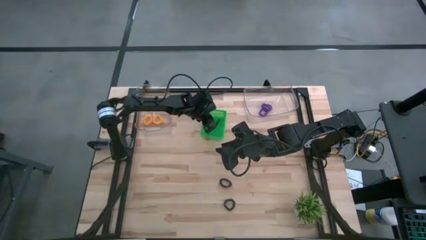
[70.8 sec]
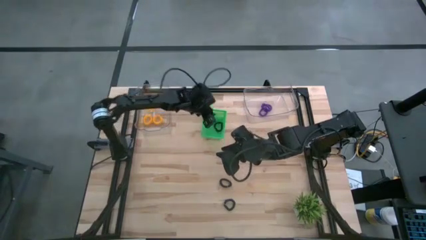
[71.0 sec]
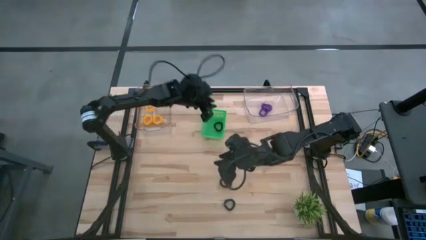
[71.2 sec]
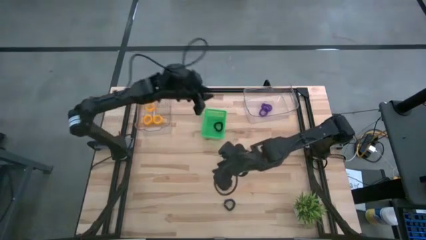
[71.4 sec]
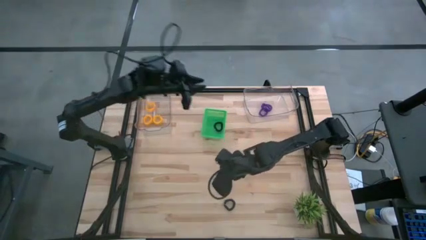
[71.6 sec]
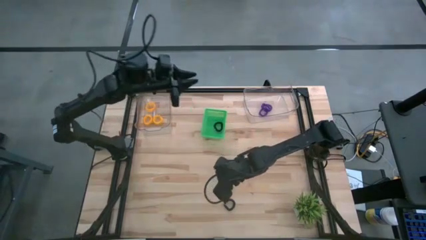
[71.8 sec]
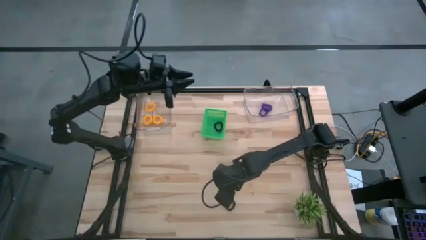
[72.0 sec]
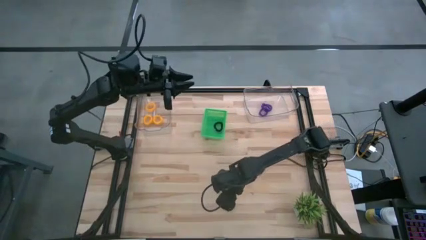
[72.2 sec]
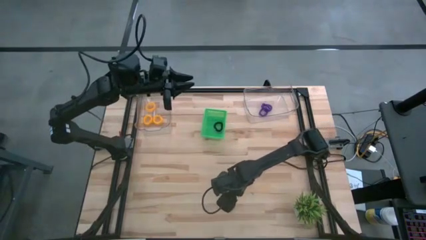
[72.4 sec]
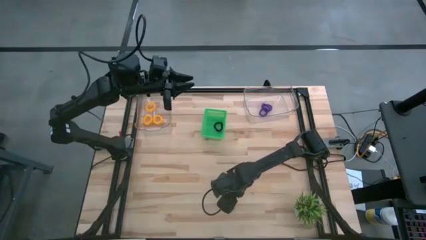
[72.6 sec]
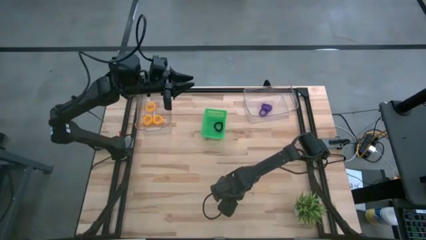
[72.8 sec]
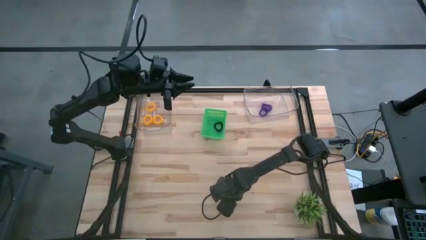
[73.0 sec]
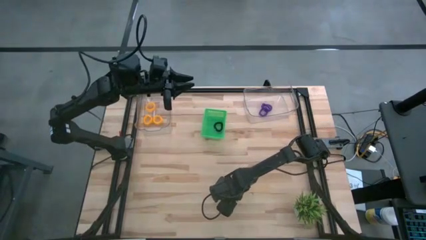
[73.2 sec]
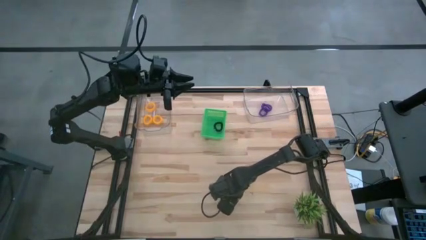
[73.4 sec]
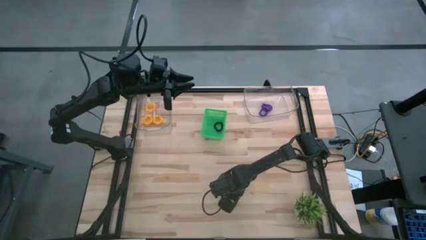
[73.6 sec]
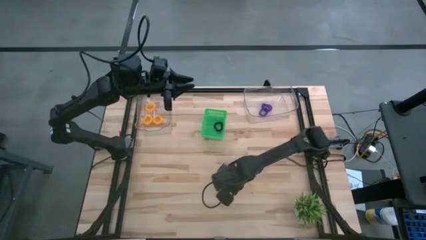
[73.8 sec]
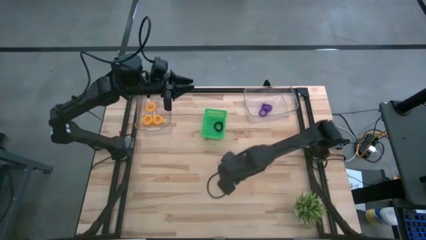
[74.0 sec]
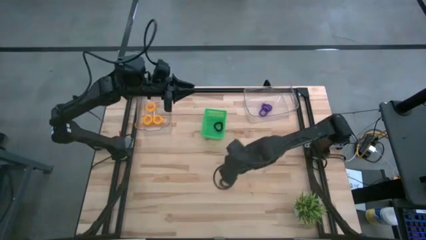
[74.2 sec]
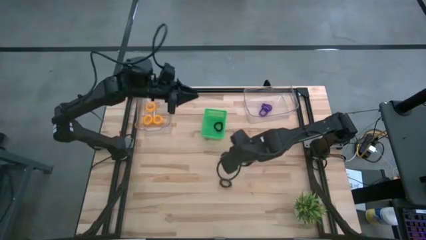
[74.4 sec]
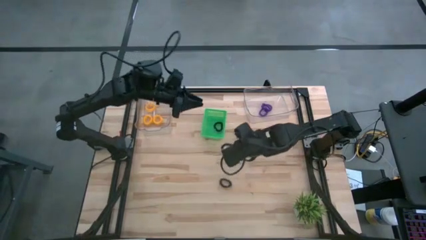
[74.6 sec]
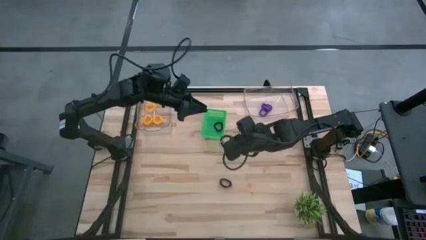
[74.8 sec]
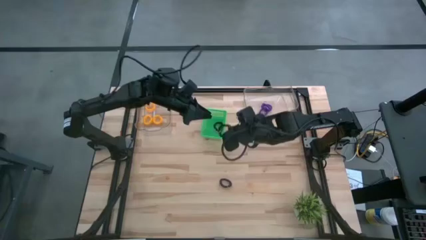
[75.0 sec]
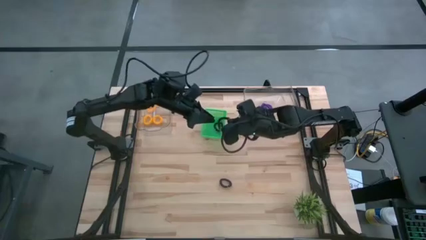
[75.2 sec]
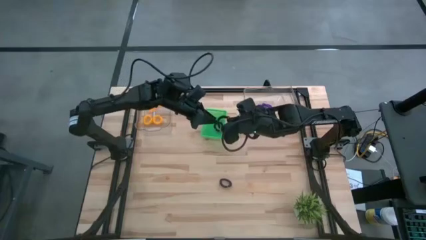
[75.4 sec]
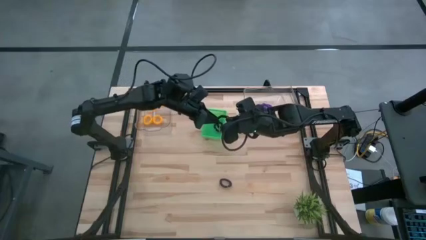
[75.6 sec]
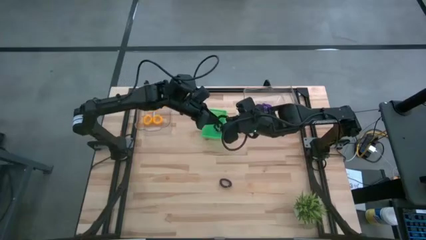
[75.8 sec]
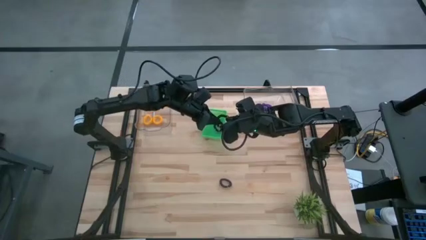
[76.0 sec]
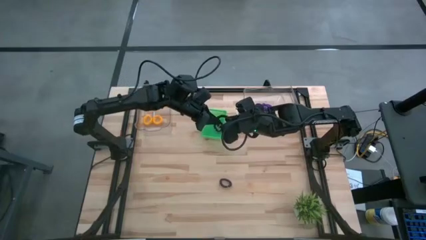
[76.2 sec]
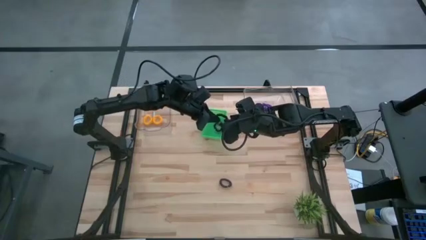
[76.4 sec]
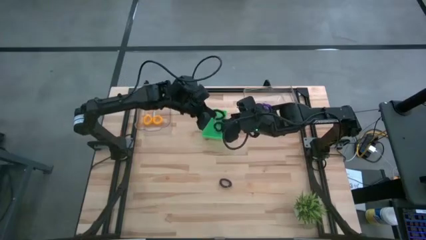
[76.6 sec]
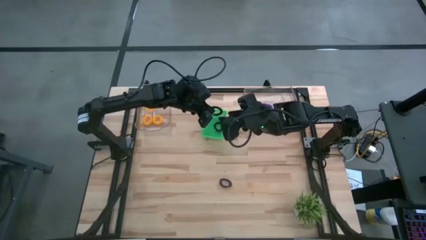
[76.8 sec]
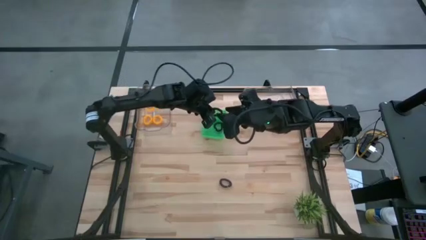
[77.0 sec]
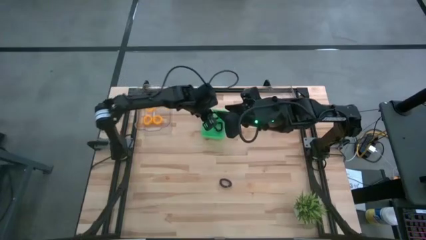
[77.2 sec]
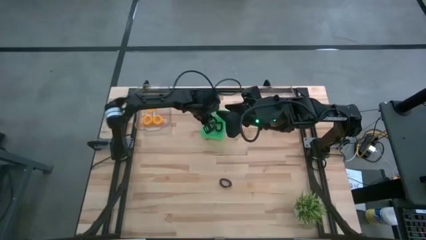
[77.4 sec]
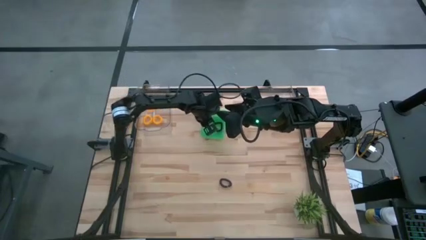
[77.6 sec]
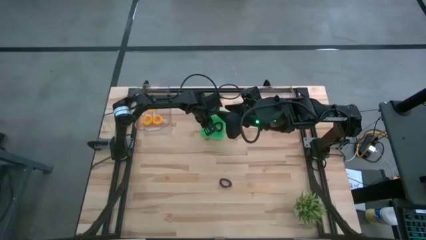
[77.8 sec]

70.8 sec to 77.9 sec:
Task: Sort spring keychains
Put the bottom black spring keychain into the green bin

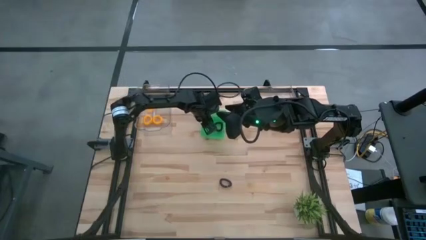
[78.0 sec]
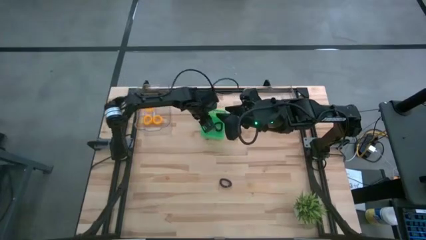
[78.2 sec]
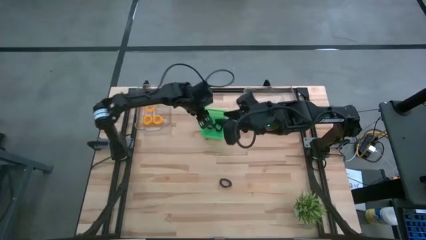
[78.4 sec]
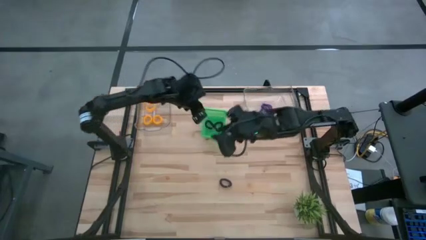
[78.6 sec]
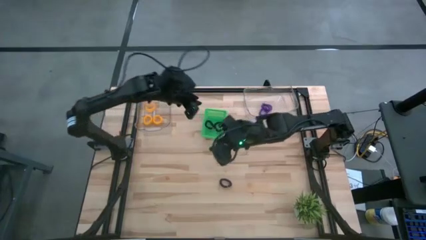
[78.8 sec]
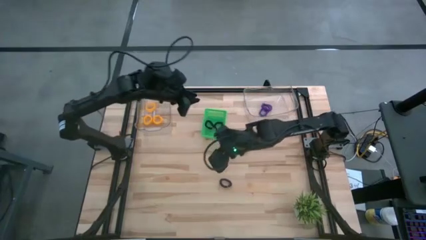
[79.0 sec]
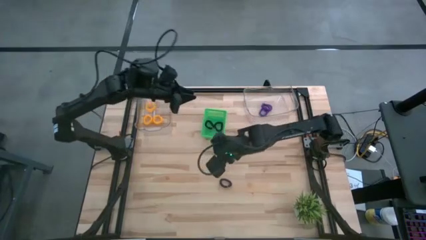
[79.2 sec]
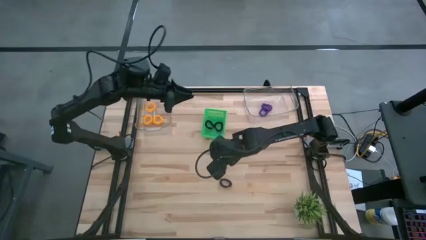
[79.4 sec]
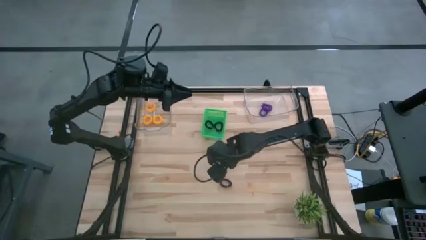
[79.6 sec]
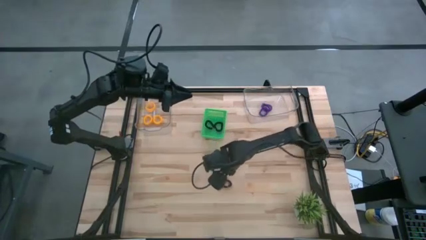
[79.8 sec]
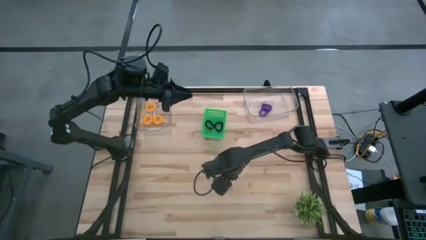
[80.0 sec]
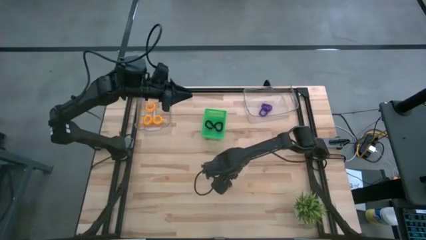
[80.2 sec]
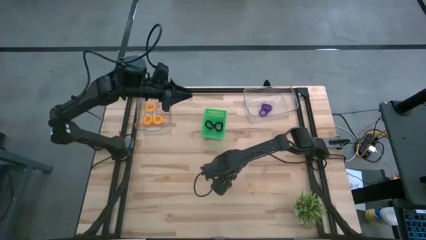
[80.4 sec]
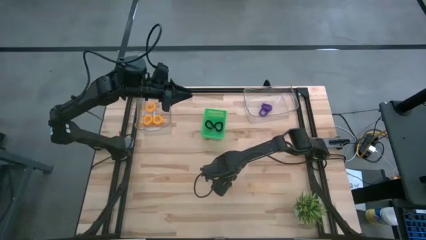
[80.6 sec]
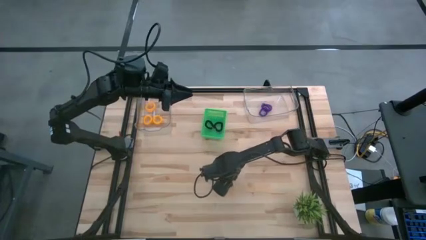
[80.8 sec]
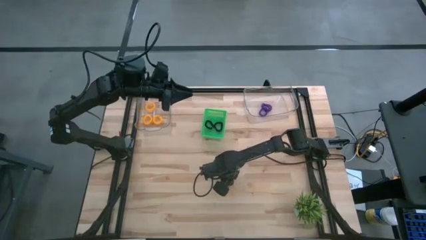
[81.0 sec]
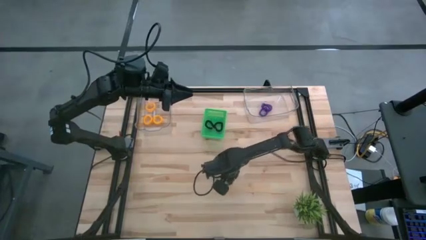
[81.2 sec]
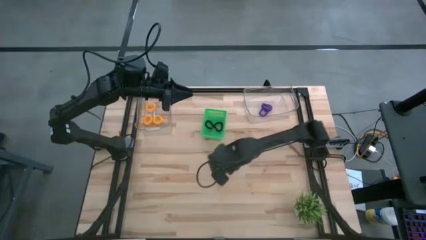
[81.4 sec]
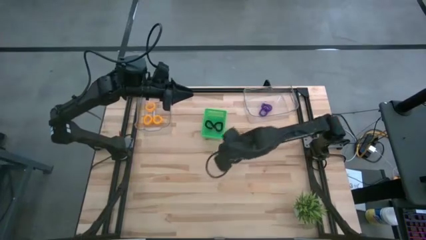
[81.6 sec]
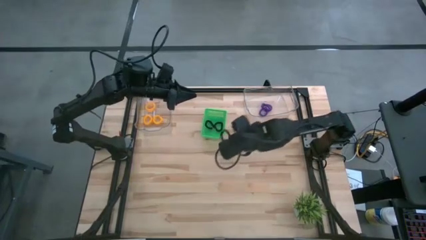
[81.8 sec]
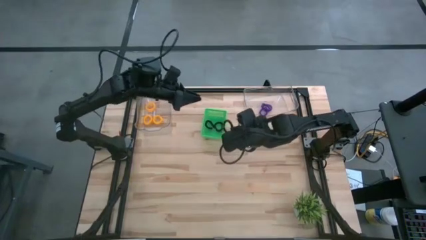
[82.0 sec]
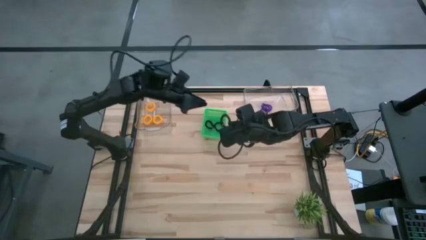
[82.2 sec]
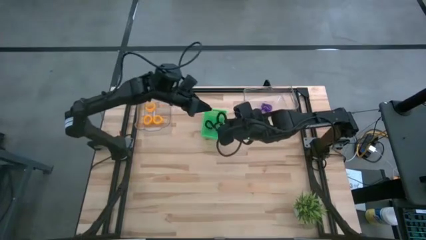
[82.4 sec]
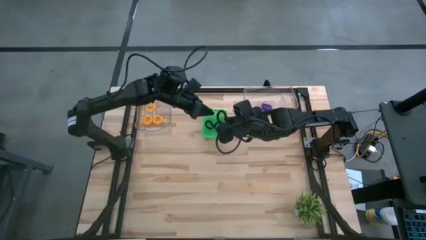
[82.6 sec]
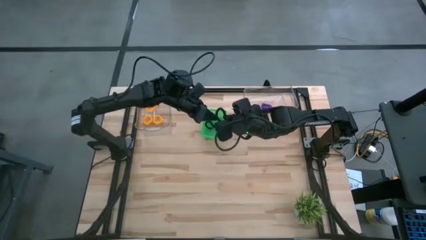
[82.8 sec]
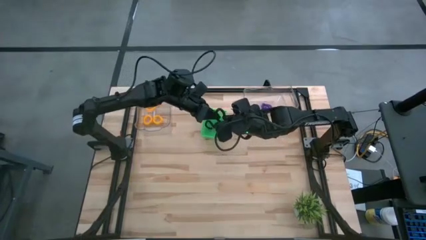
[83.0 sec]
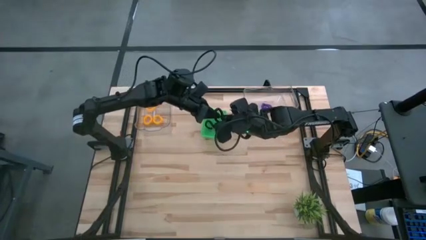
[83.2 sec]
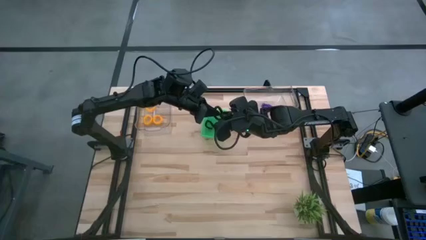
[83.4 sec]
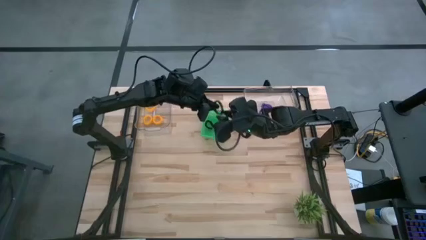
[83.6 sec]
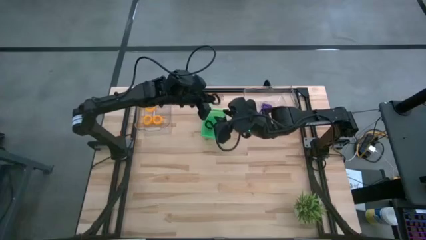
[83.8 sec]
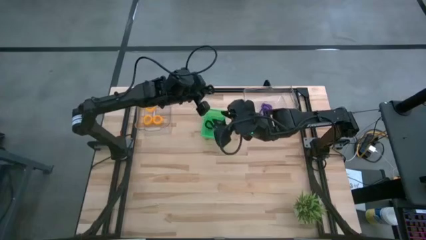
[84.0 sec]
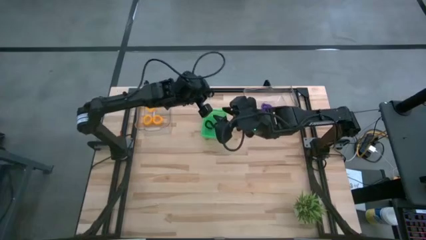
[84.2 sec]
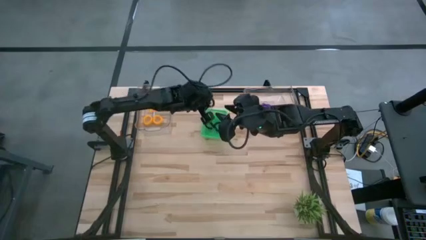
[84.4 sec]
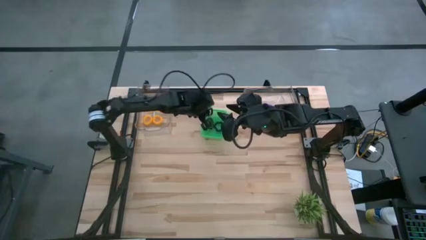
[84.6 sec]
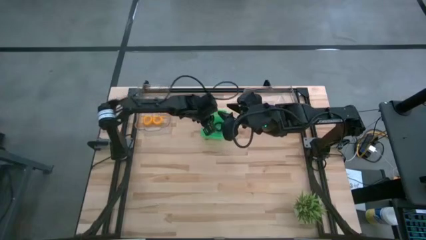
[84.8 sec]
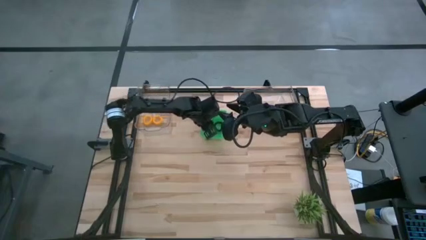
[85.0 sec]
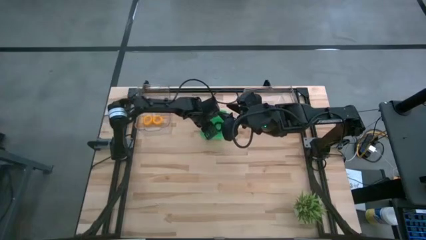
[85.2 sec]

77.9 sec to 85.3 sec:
Put the black spring keychain into the green bin

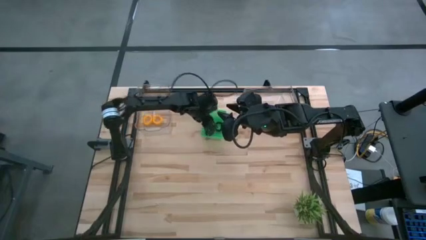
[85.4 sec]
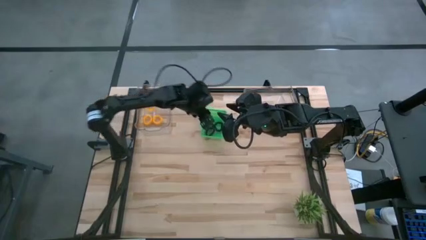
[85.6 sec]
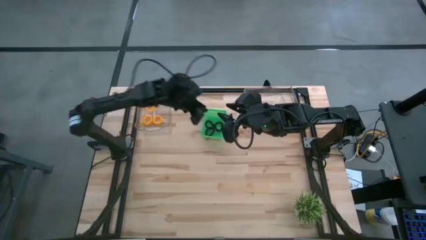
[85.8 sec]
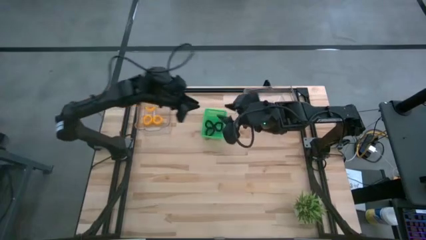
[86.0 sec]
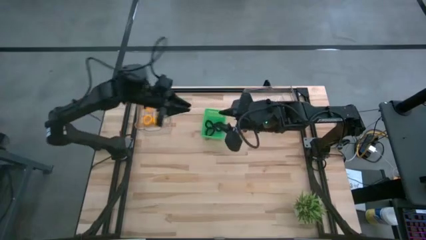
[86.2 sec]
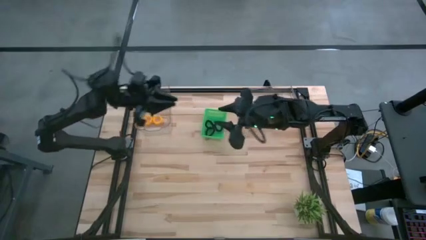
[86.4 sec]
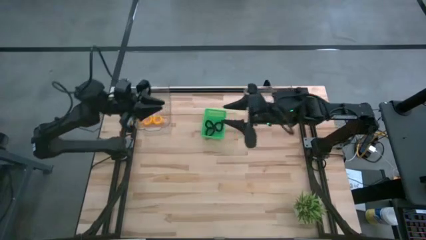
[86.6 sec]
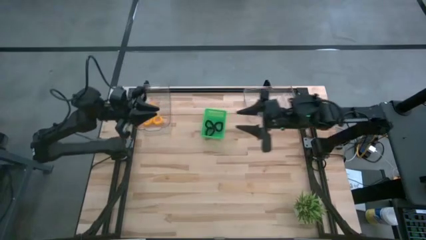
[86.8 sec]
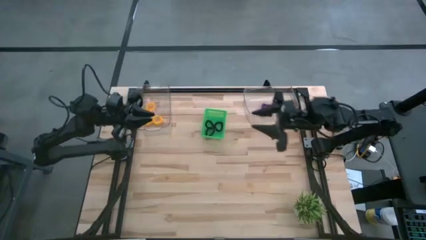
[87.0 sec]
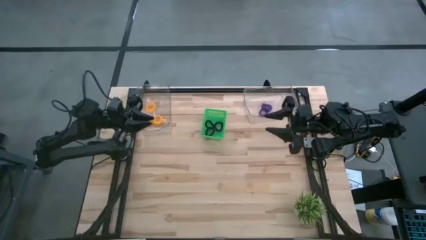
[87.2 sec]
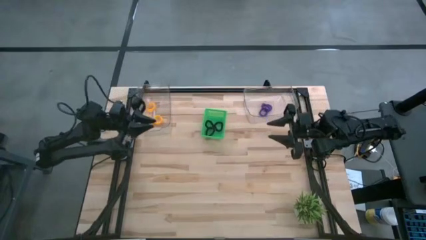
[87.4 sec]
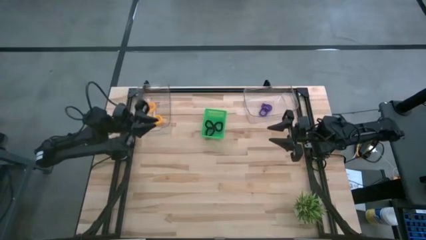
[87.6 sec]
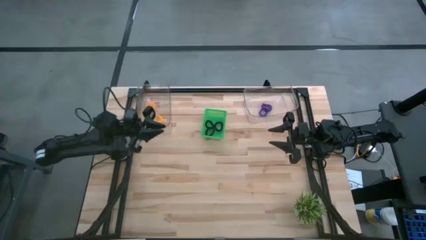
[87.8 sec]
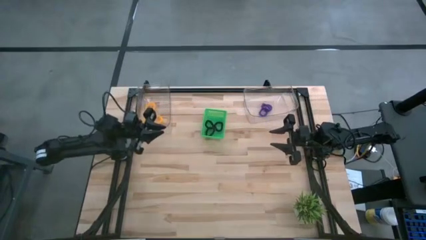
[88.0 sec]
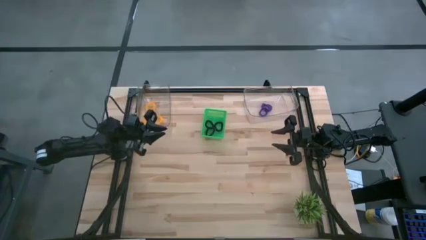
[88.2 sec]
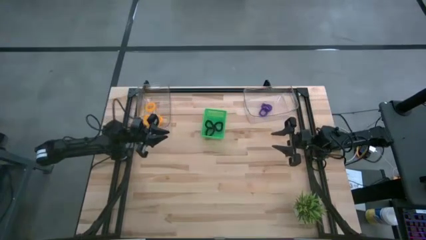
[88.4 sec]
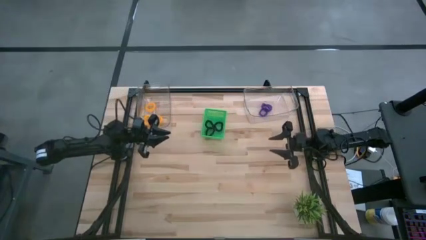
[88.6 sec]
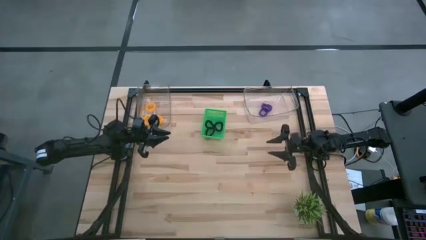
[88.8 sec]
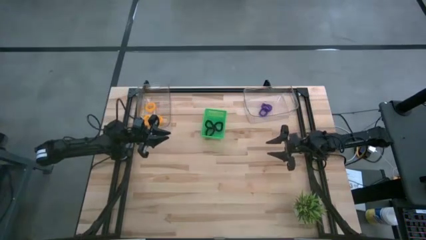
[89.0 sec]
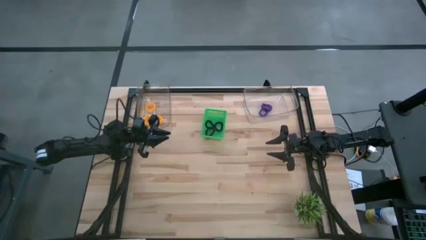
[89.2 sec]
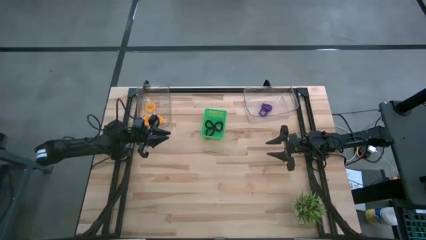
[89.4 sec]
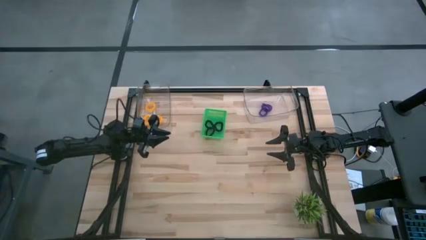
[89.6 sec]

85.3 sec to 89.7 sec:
Return to Home Position
